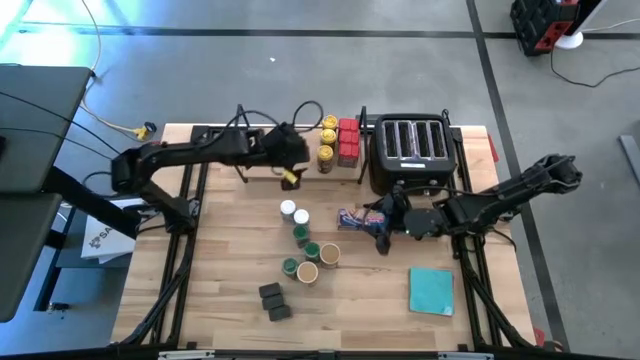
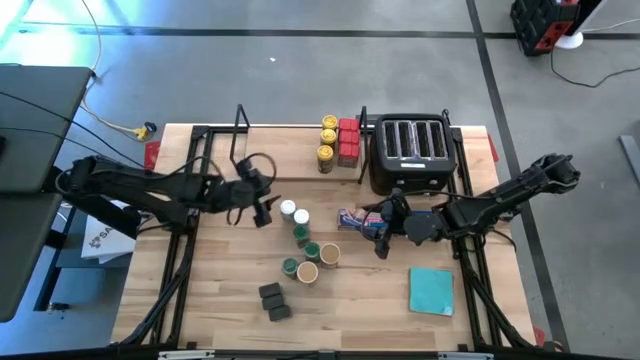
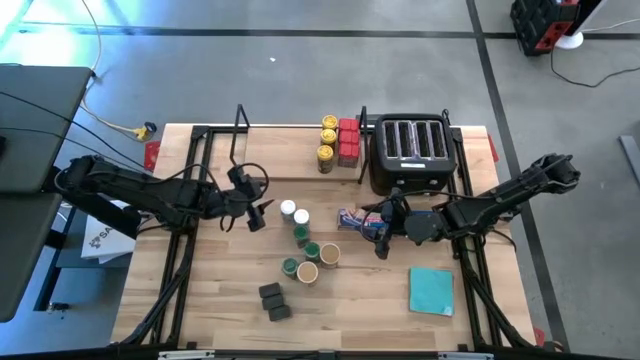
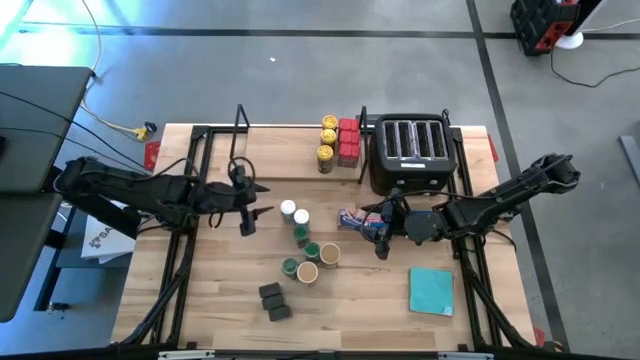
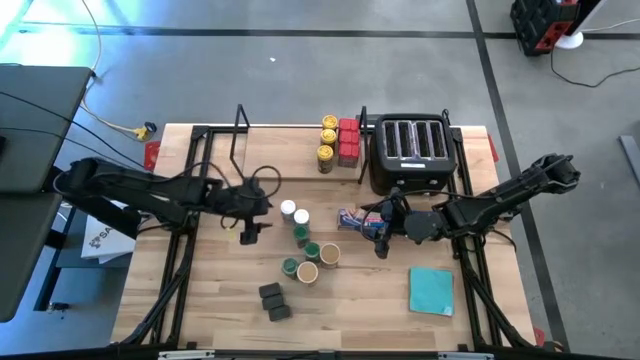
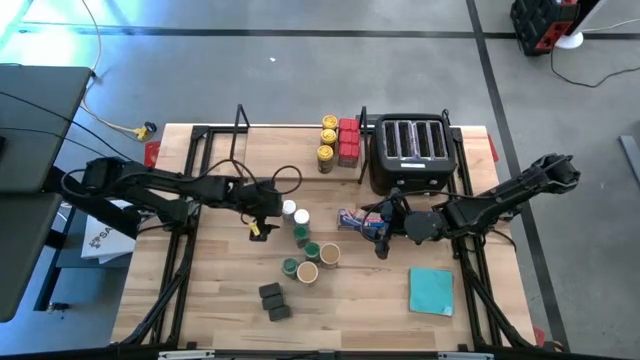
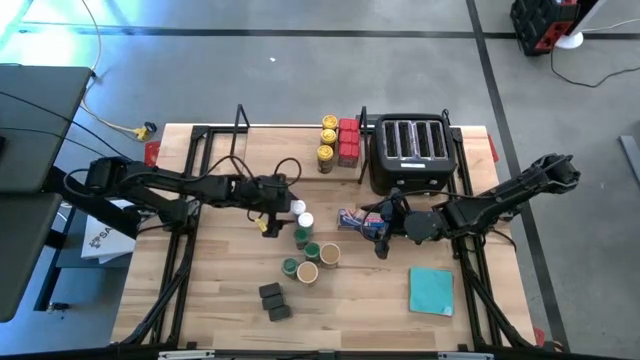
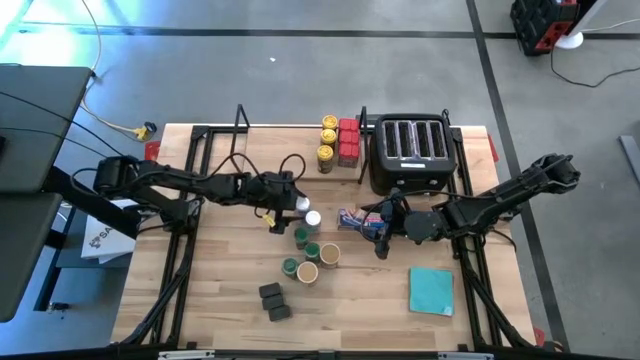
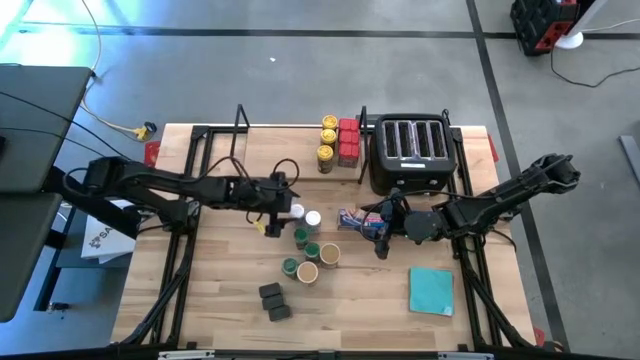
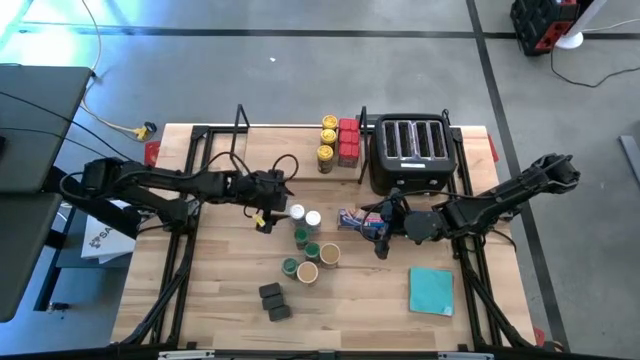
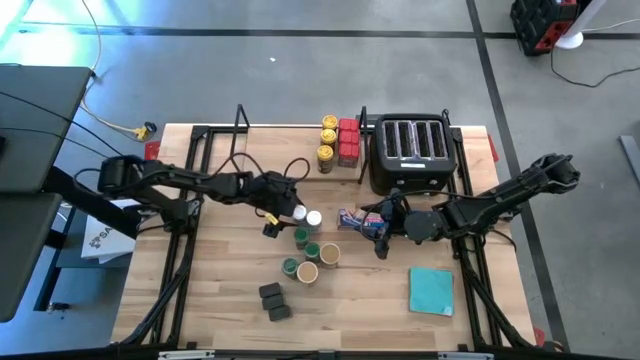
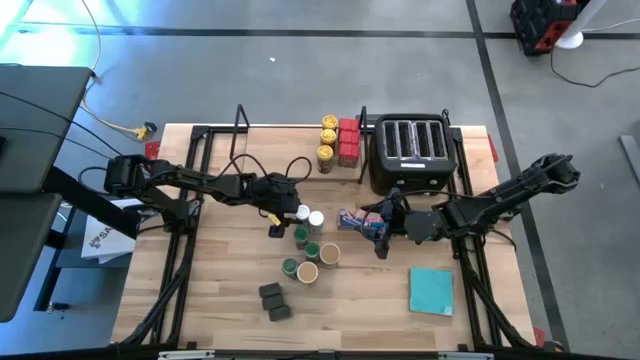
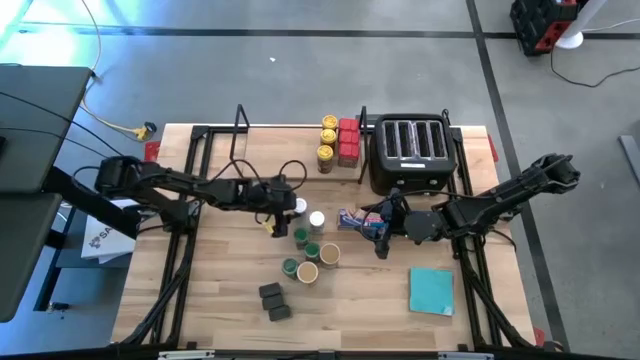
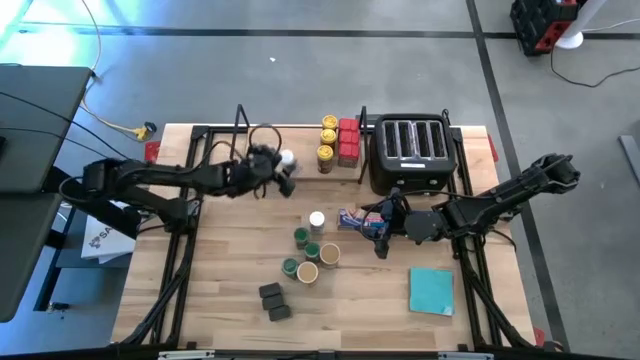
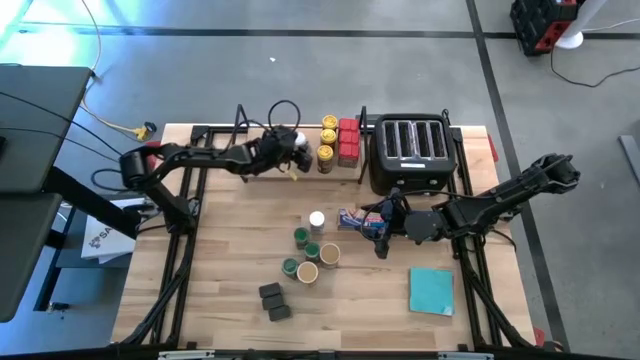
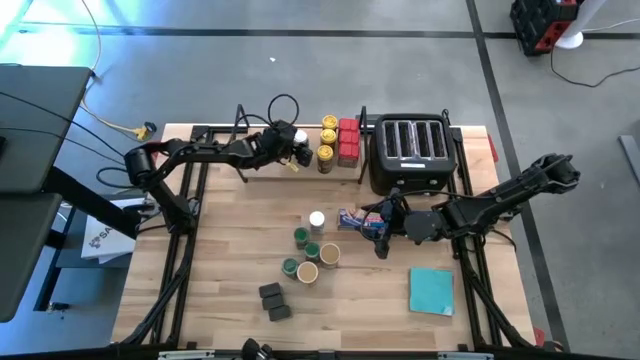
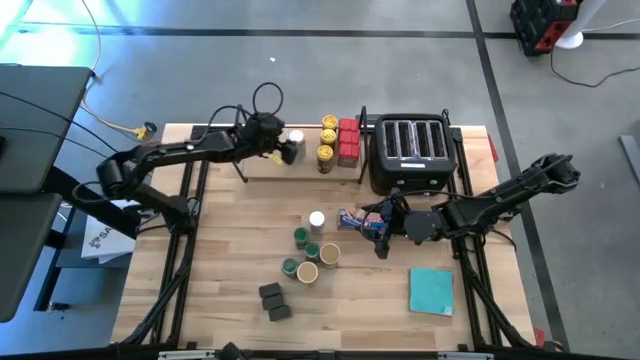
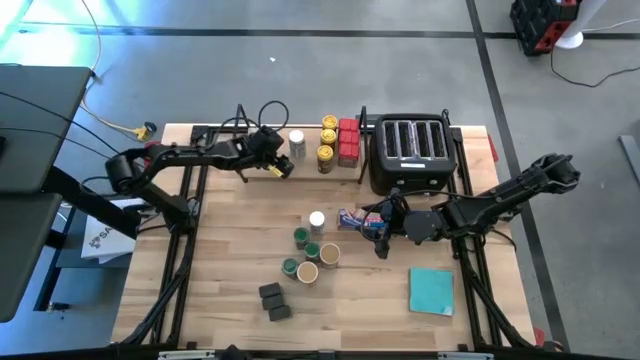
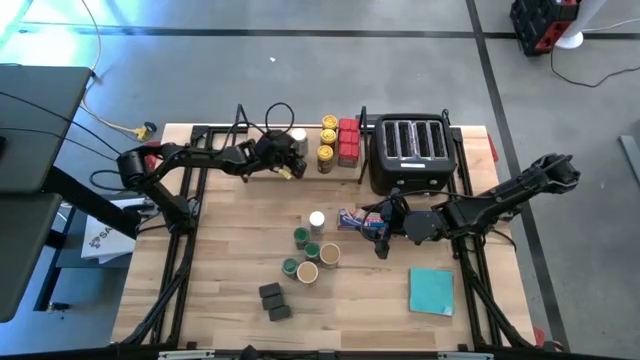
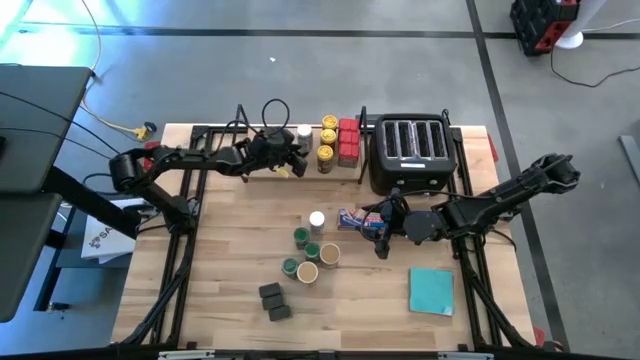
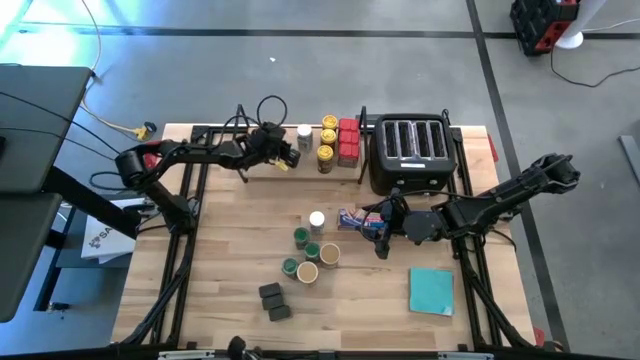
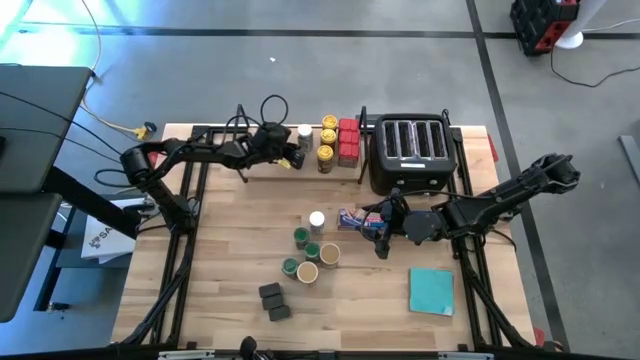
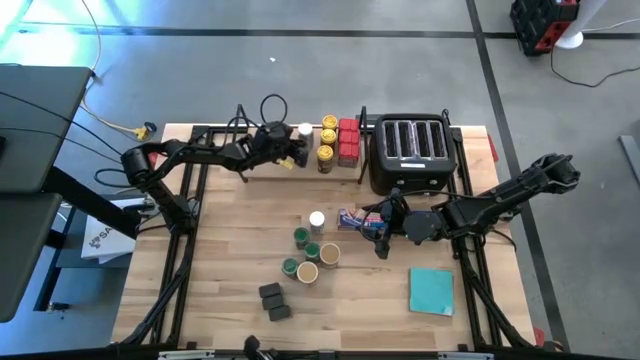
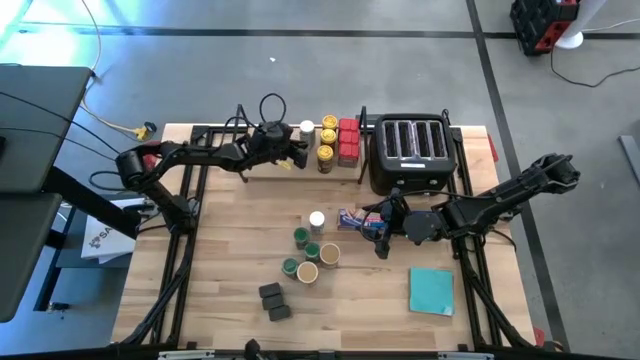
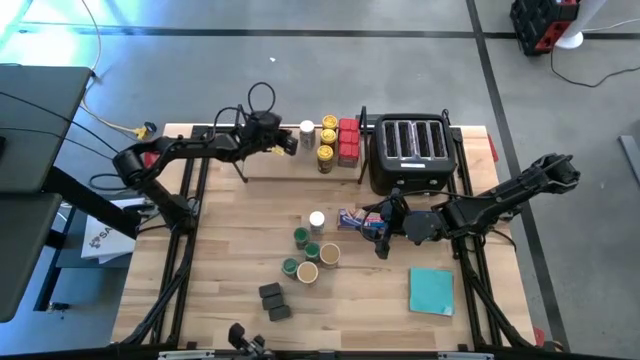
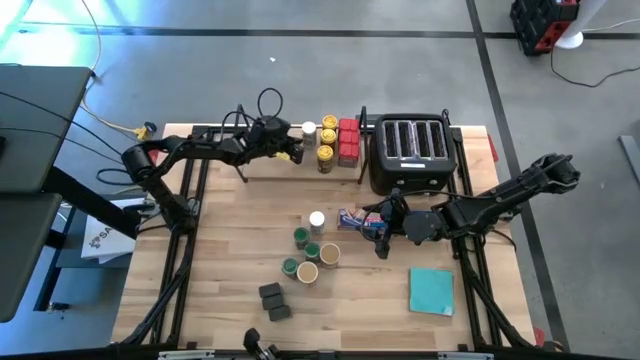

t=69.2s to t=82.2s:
Task: Shelf spices
Put the left white seasoning bottle on the shelf

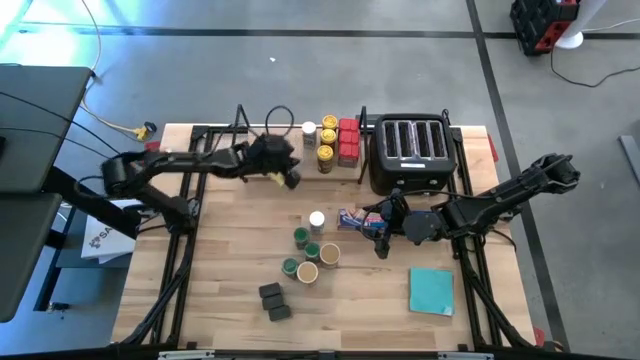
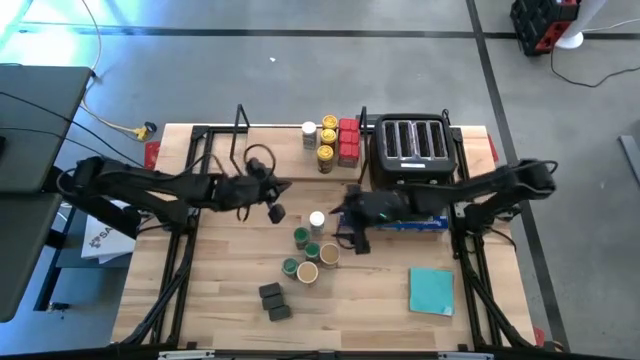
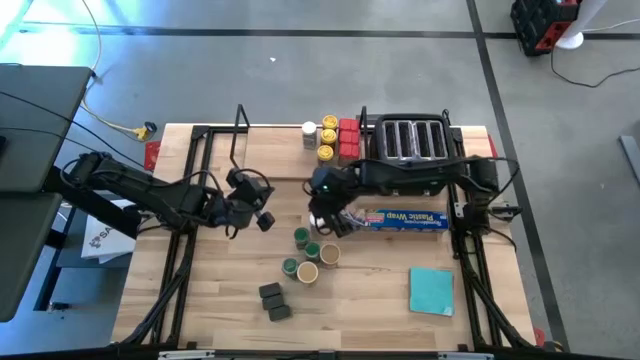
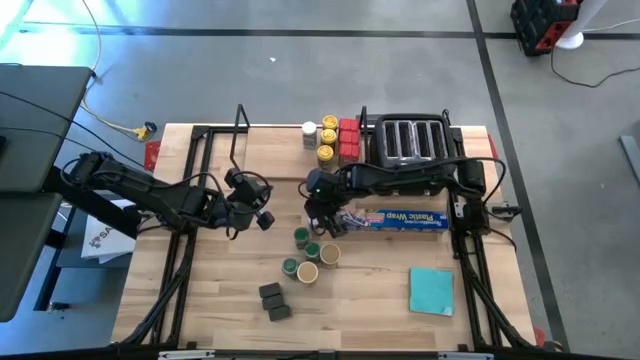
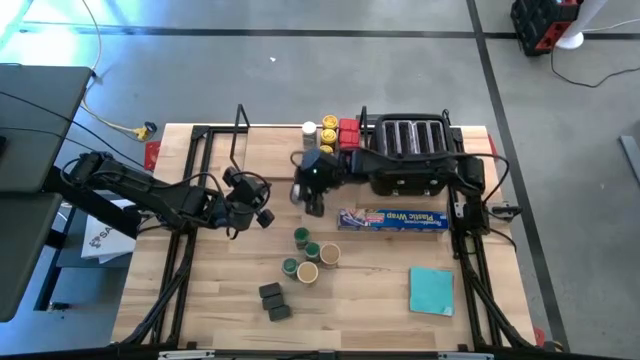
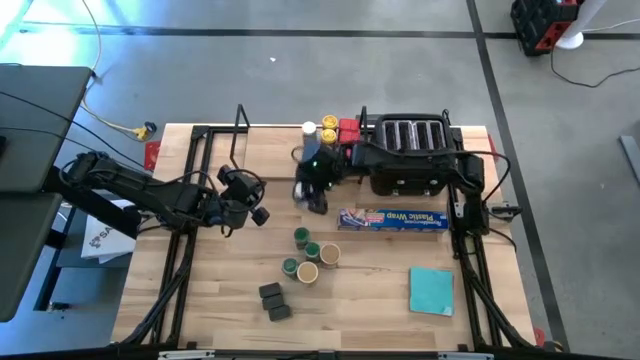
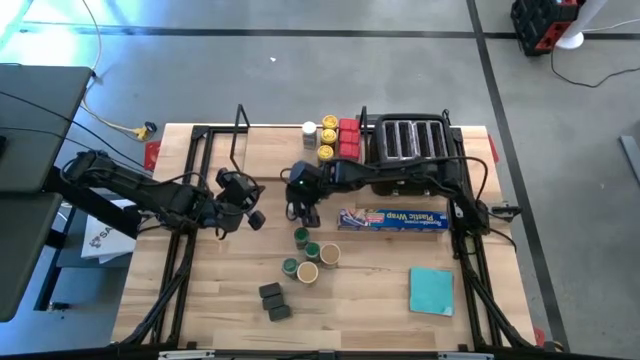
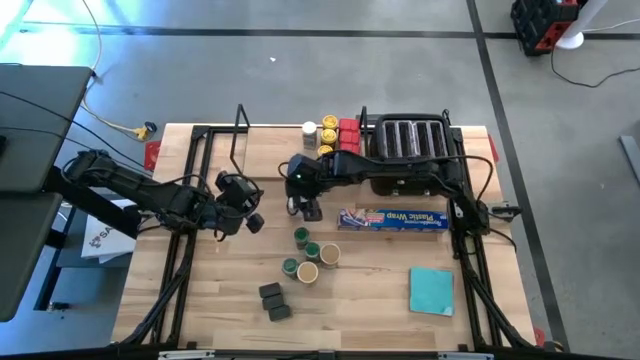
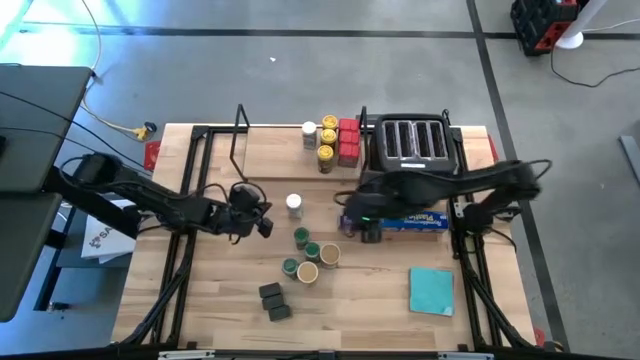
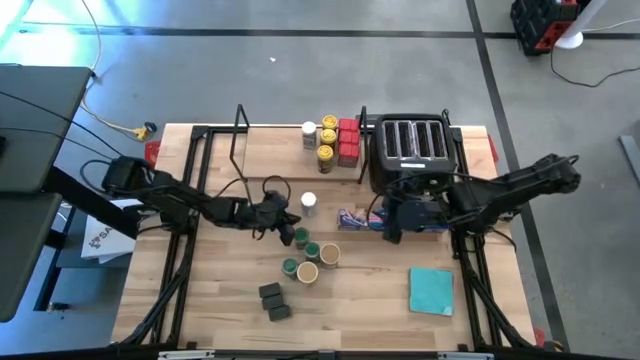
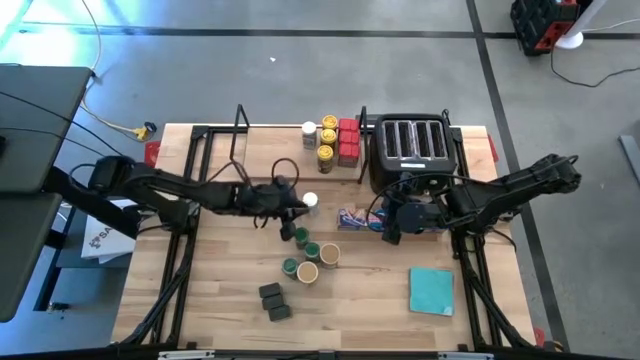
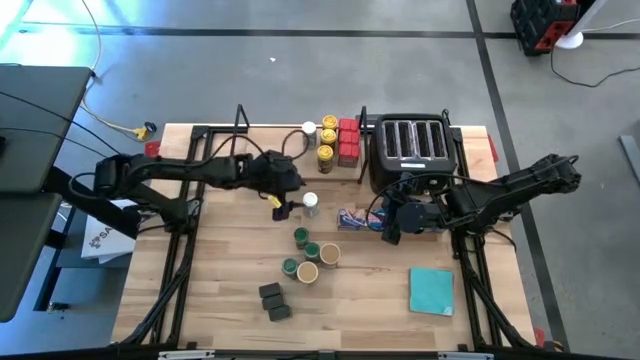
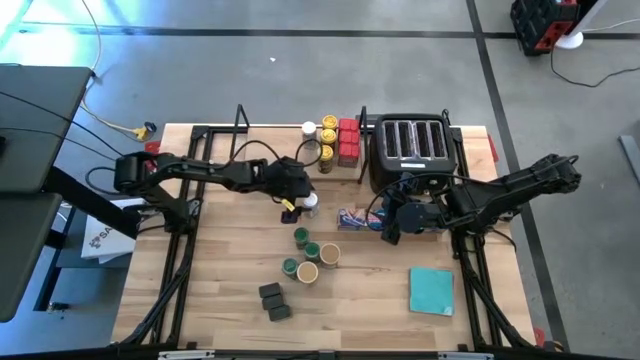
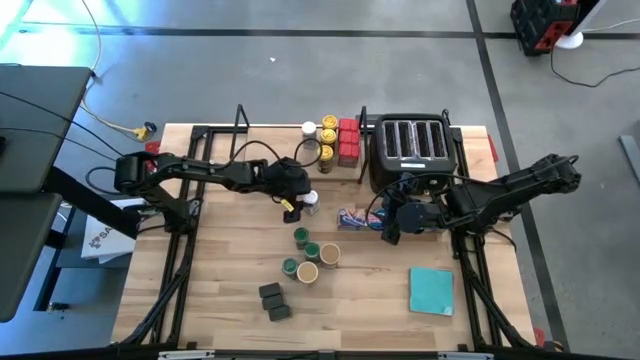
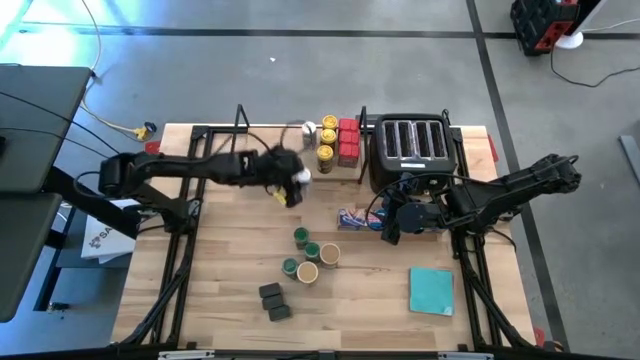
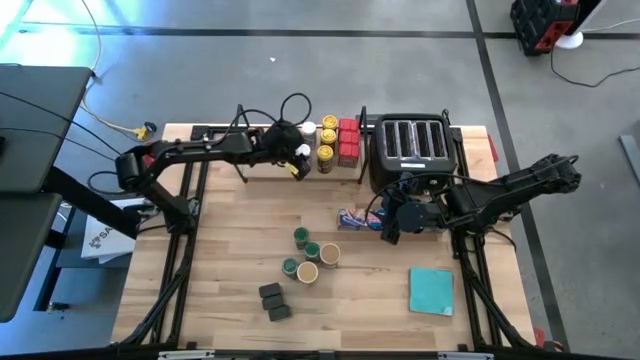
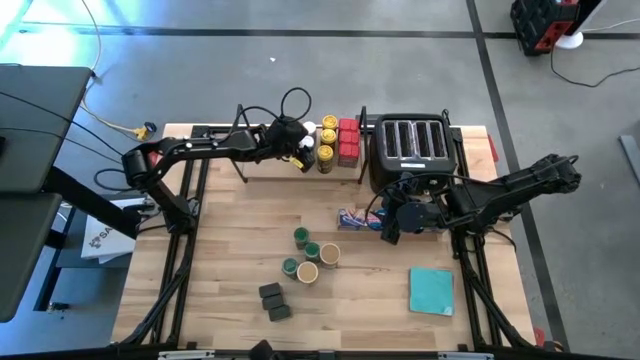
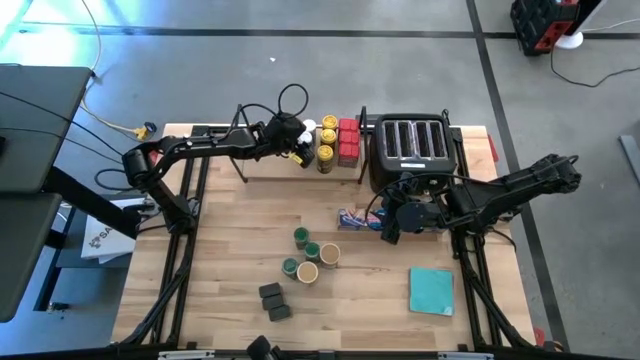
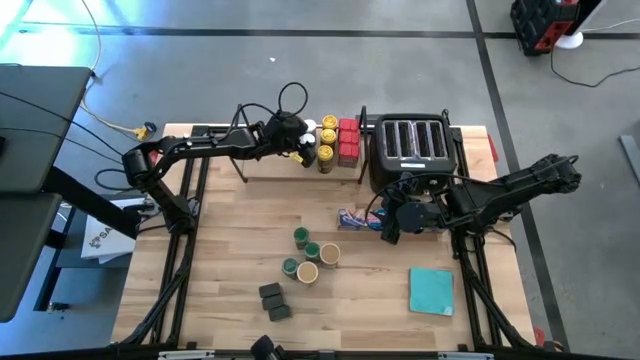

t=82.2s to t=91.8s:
Put the white seasoning bottle on the shelf aligned with the other white seasoning bottles
